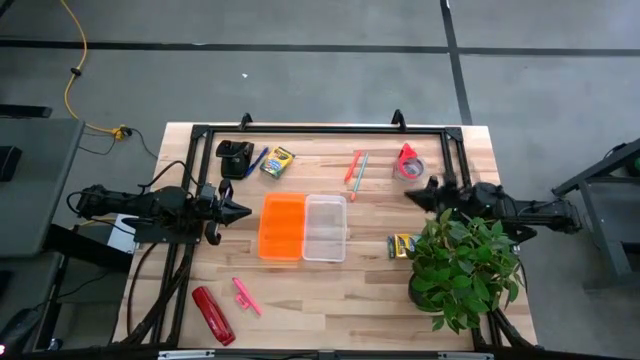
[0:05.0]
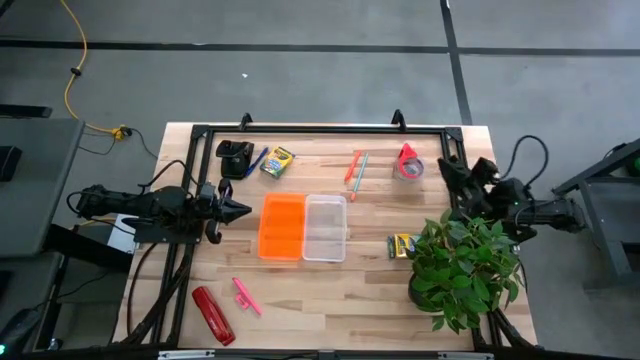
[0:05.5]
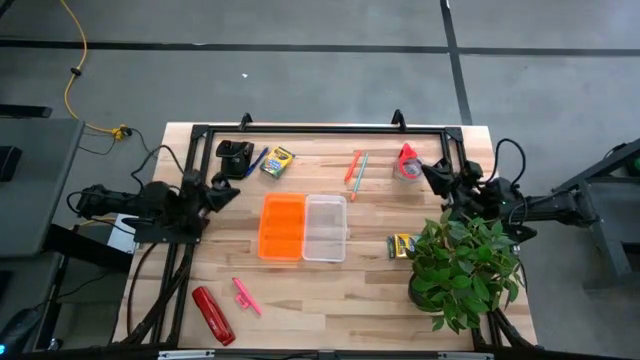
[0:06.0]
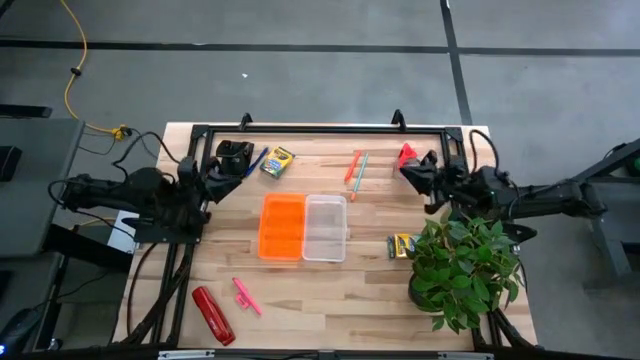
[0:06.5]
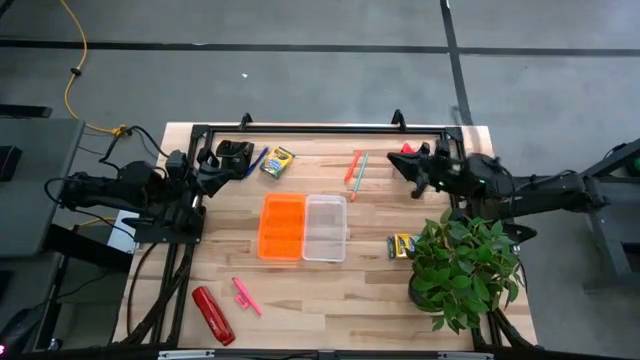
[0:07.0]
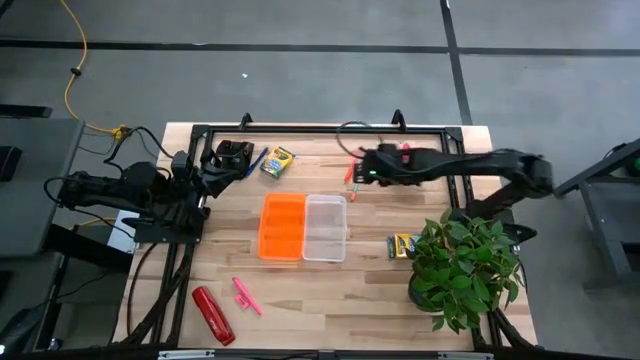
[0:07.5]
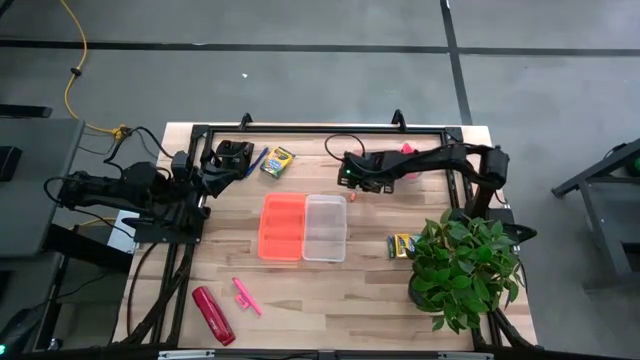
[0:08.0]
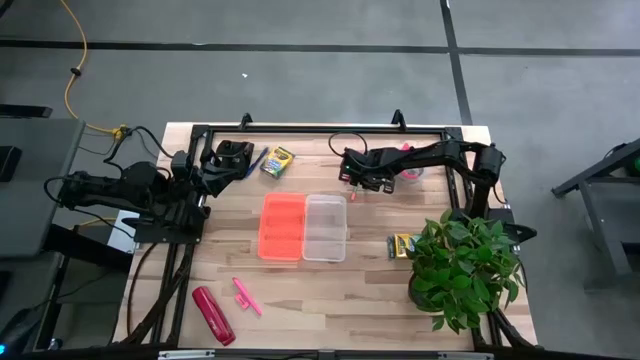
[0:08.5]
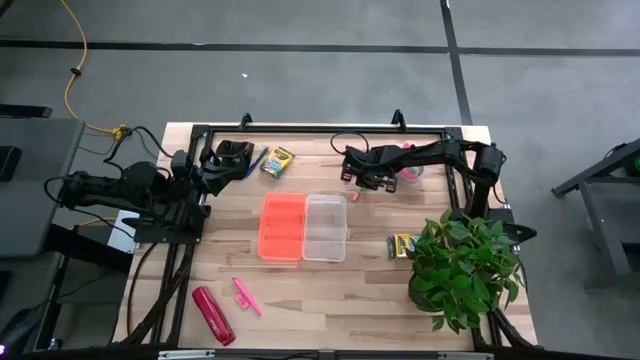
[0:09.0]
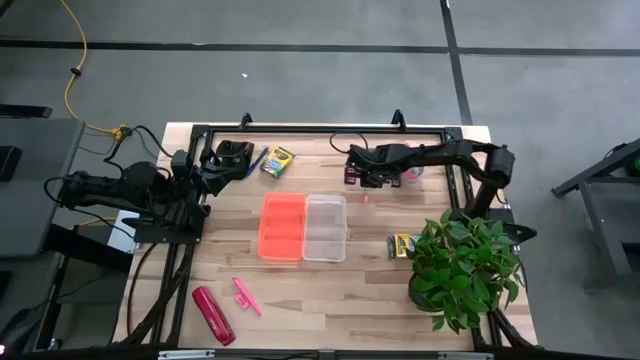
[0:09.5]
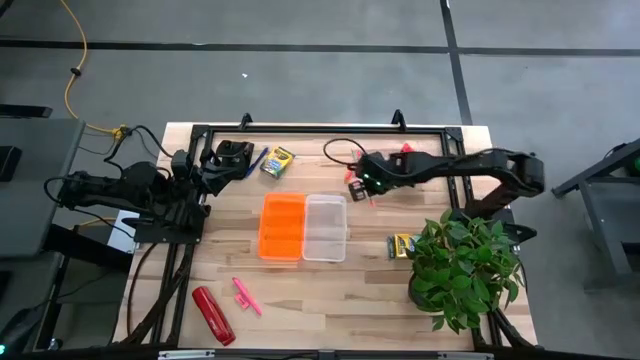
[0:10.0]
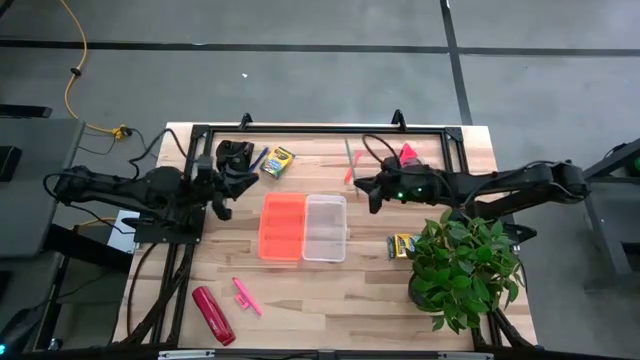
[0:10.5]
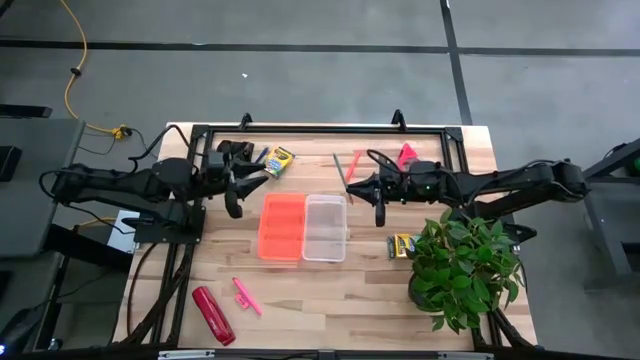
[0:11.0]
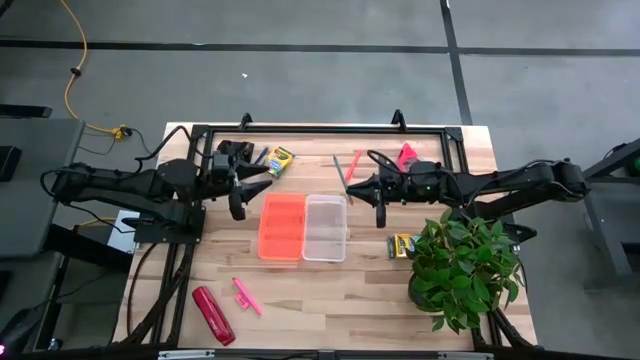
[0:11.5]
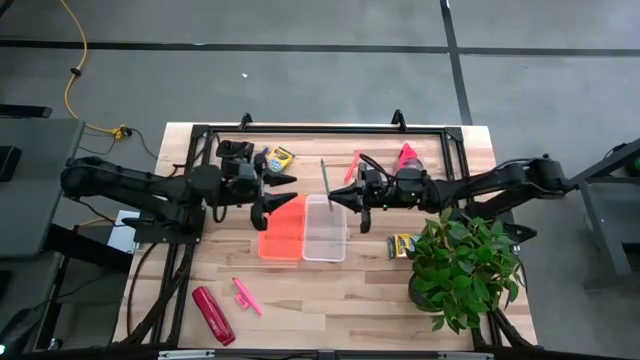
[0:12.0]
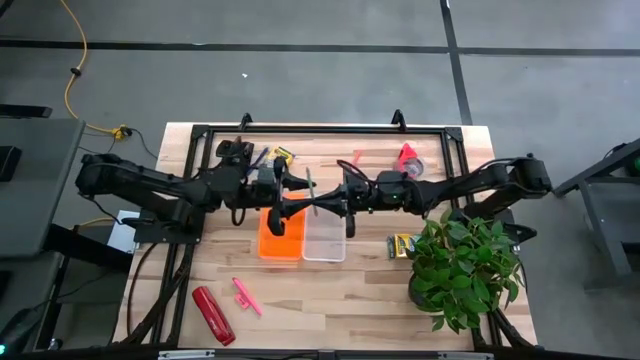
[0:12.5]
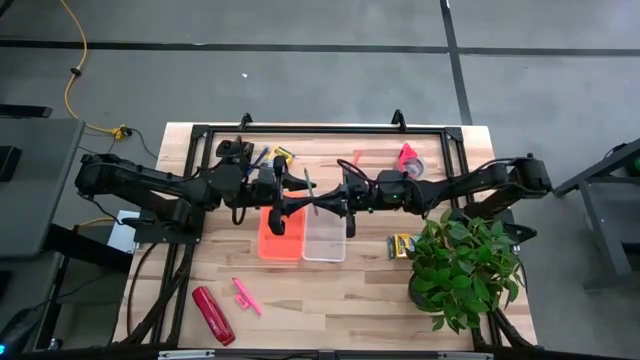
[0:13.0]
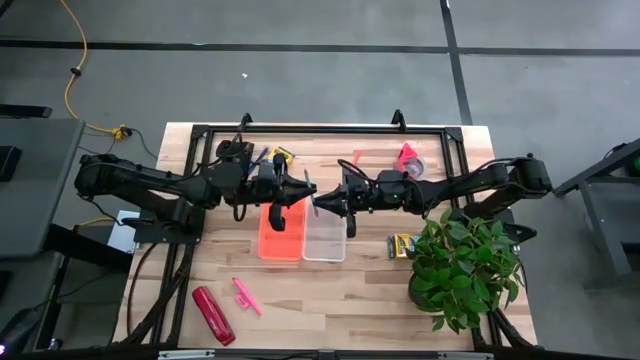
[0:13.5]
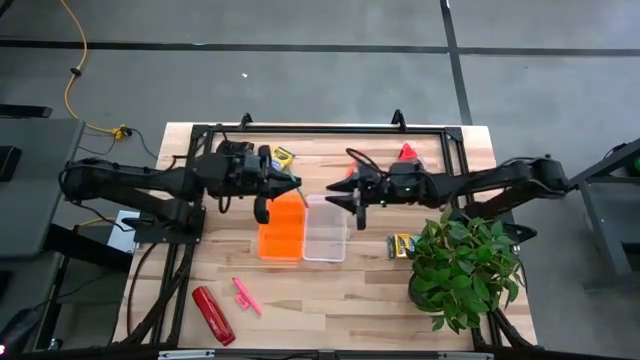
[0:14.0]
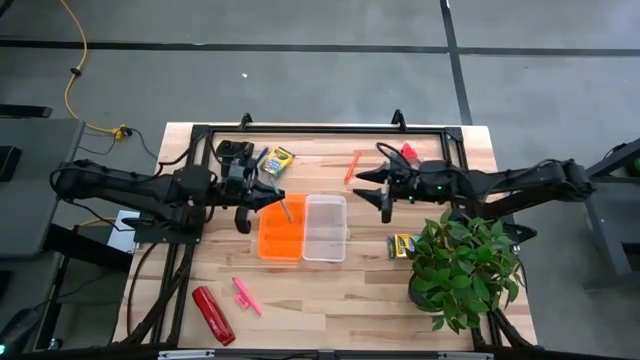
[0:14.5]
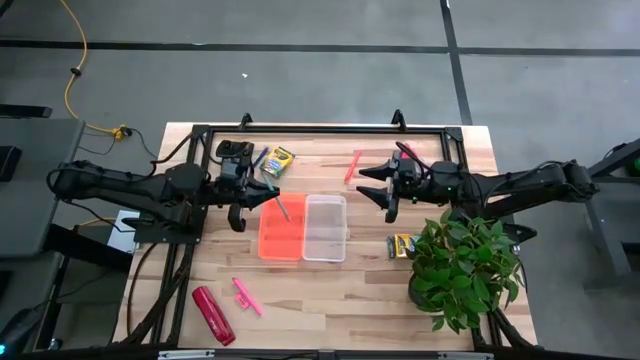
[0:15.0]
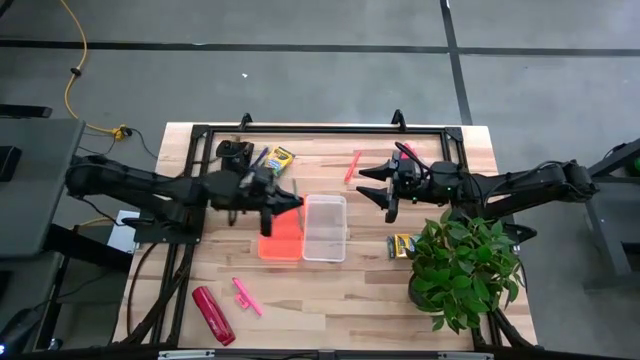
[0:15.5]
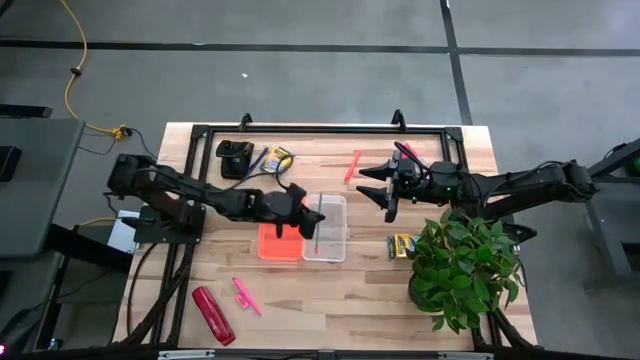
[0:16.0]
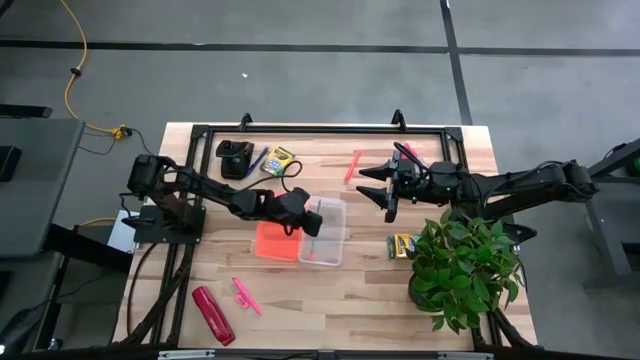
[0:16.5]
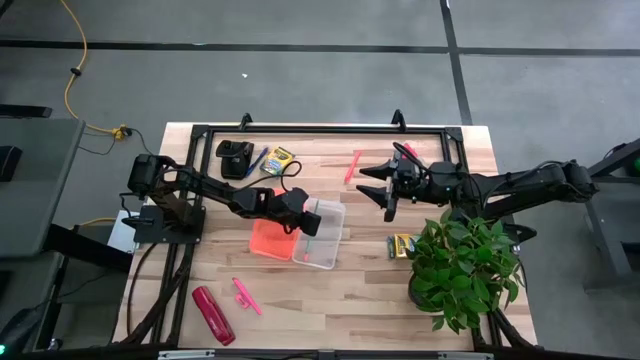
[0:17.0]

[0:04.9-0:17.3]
Task: Pack school essentials
Put the light blue pencil in the supply box

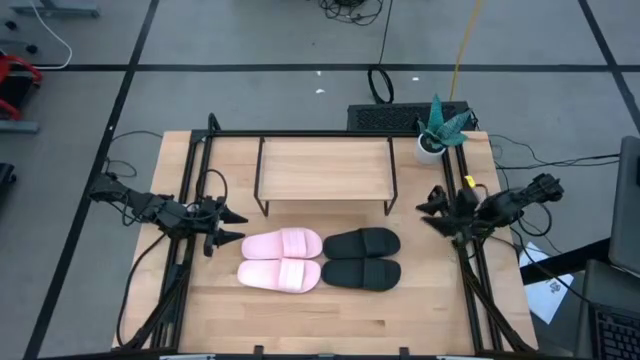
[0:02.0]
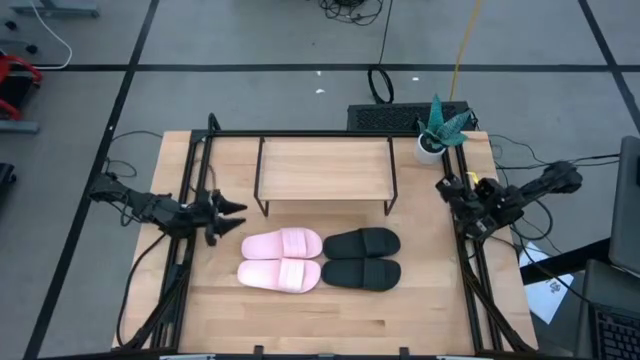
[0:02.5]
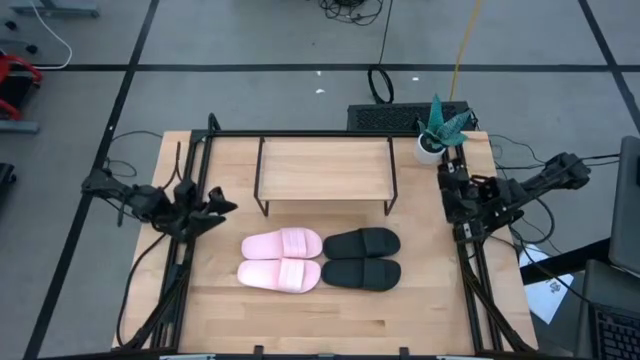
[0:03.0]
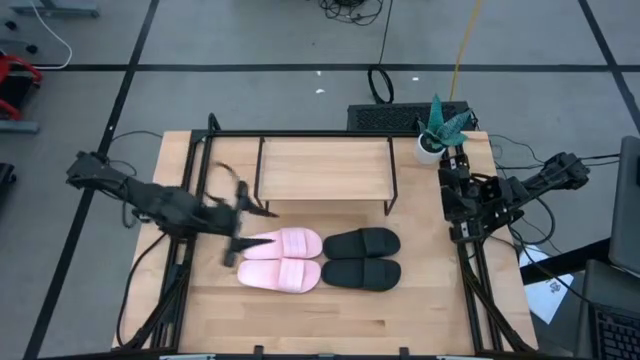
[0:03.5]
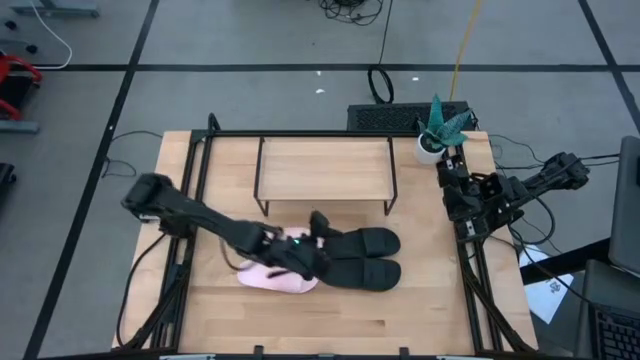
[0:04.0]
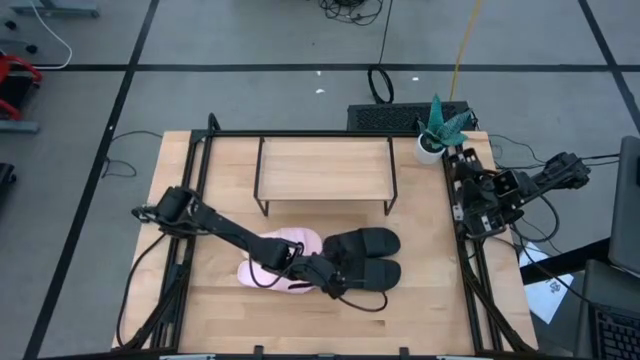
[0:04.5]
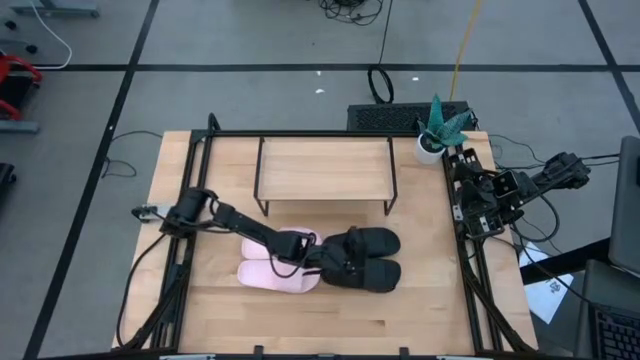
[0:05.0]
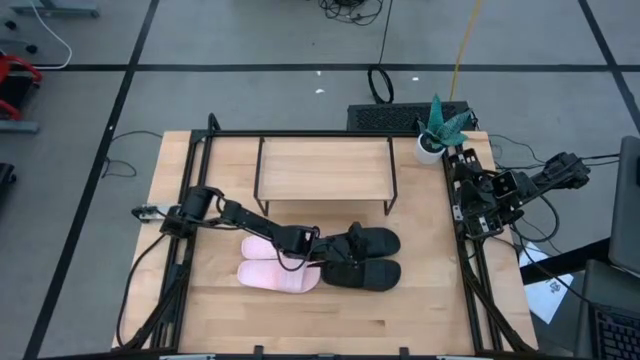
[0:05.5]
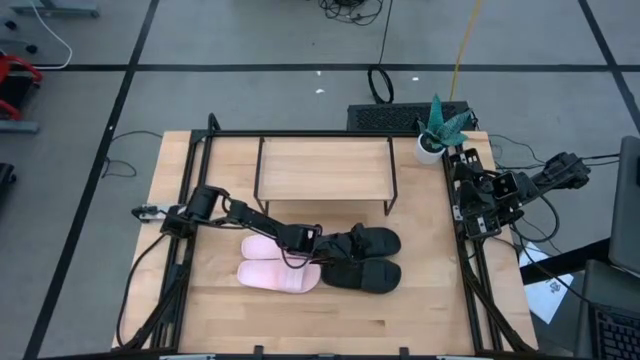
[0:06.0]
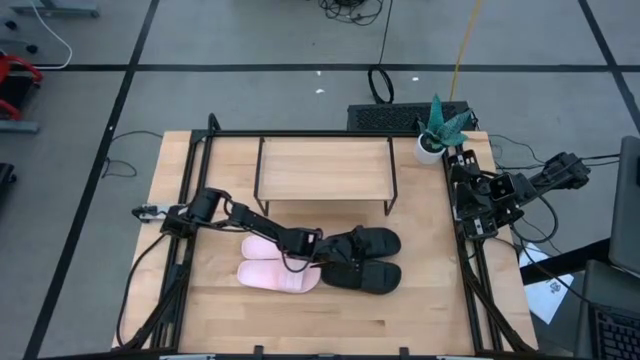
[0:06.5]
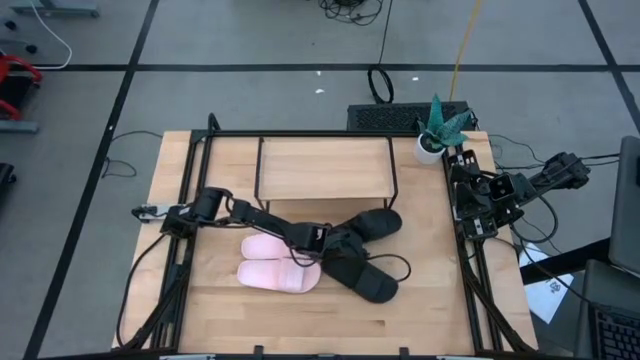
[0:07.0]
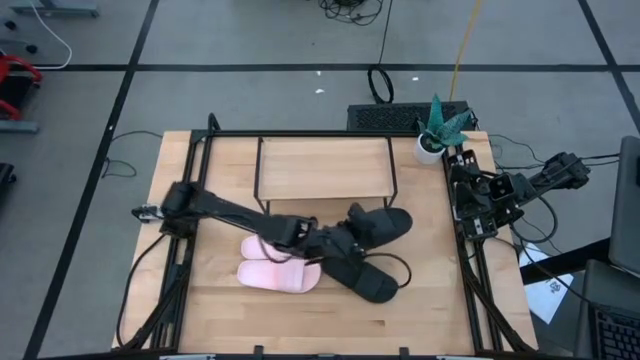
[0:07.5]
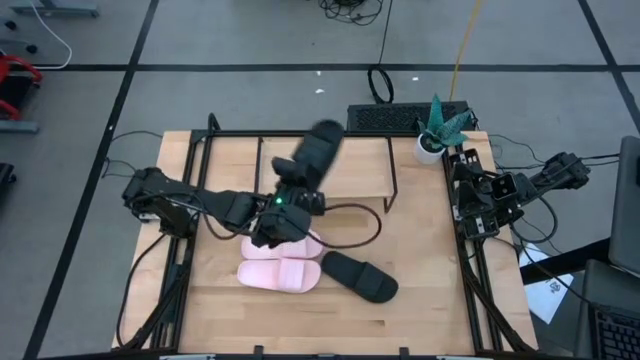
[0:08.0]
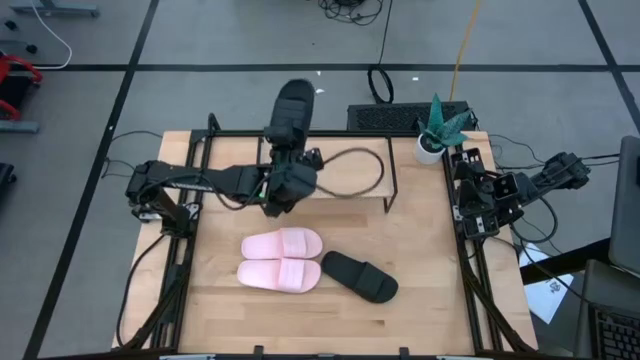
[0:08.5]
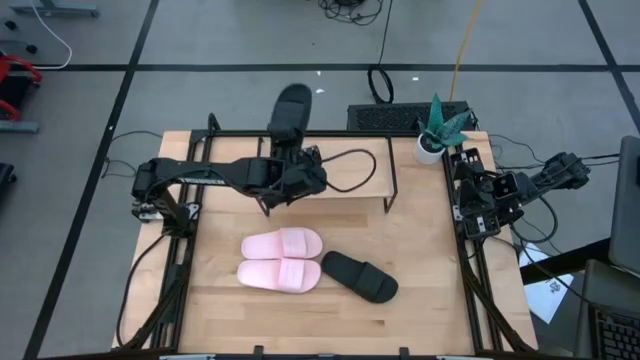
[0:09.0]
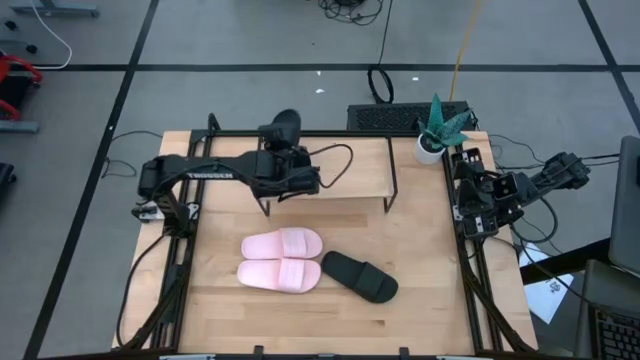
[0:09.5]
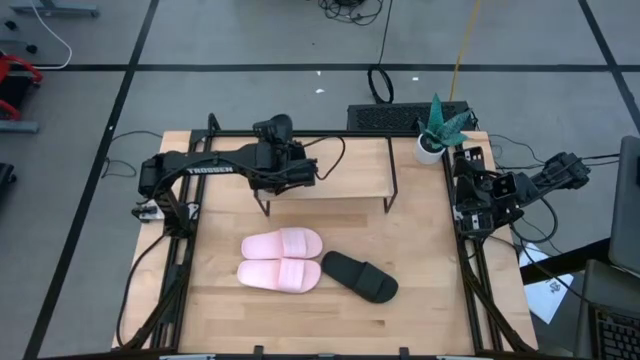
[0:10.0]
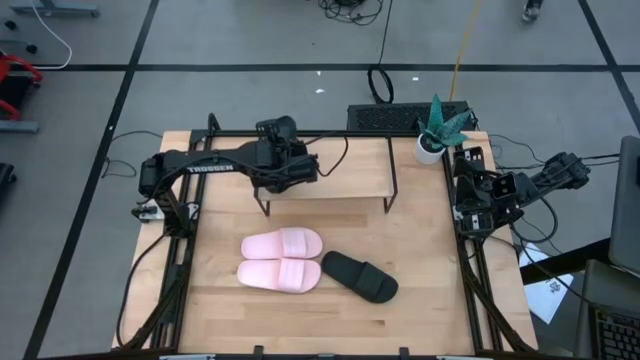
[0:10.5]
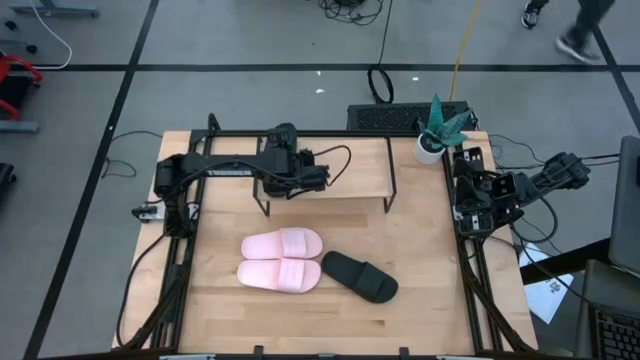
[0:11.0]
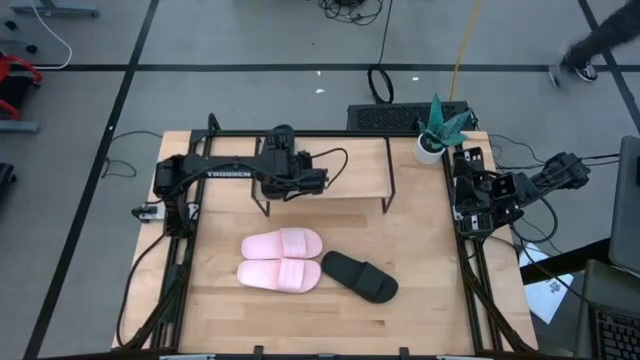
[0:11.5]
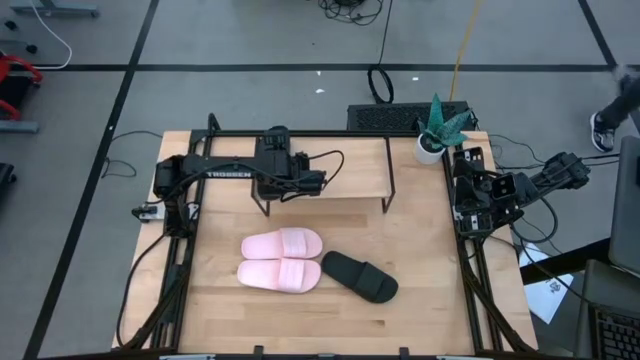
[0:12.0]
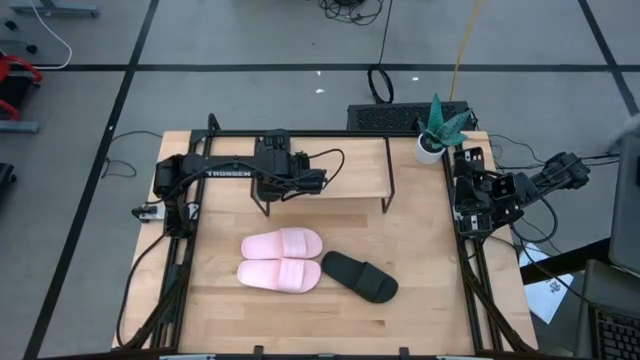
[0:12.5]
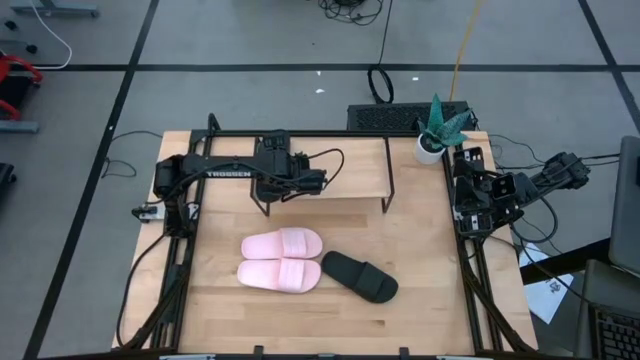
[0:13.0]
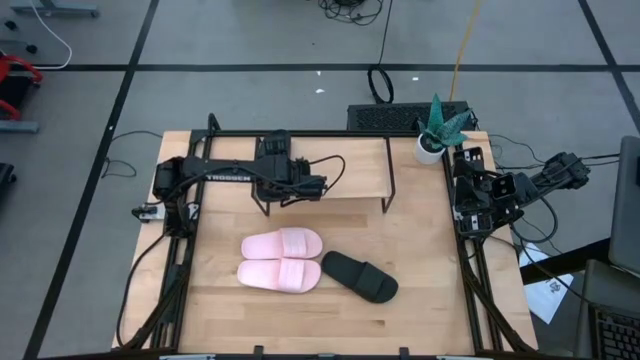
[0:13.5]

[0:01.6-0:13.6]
Task: Pick and place slides into the shelf
Put the top black slide on the shelf
